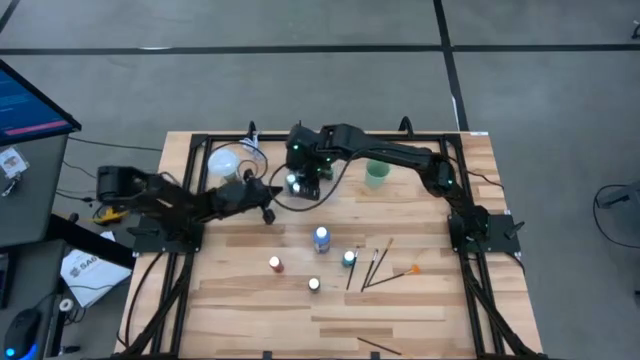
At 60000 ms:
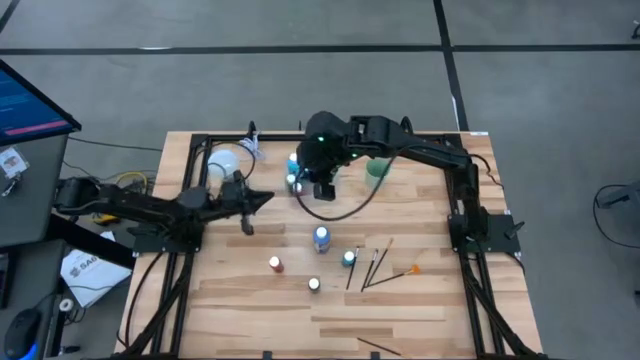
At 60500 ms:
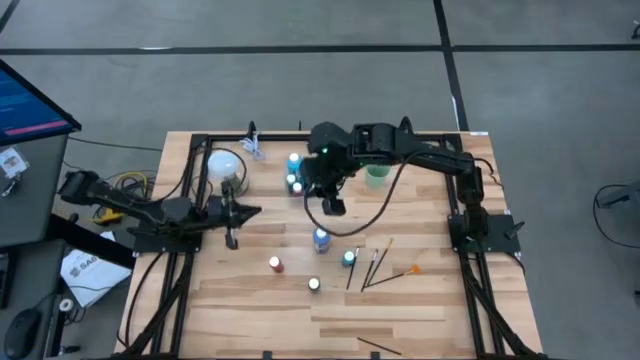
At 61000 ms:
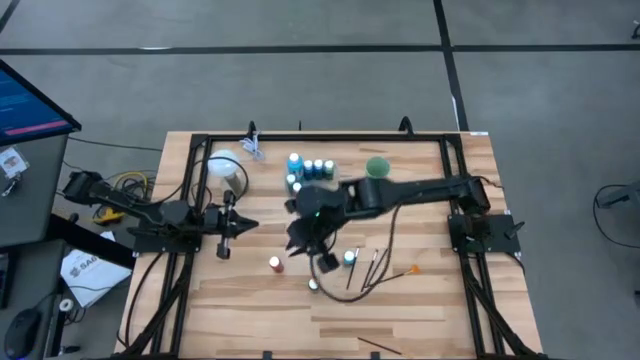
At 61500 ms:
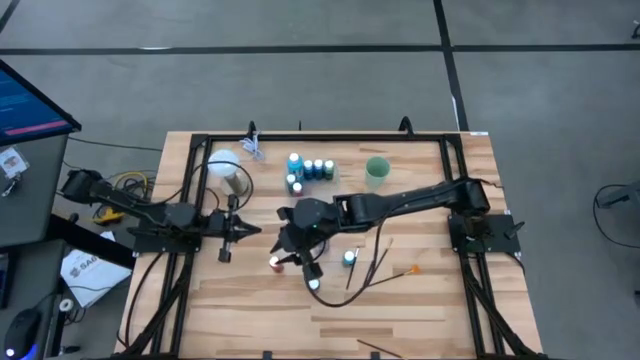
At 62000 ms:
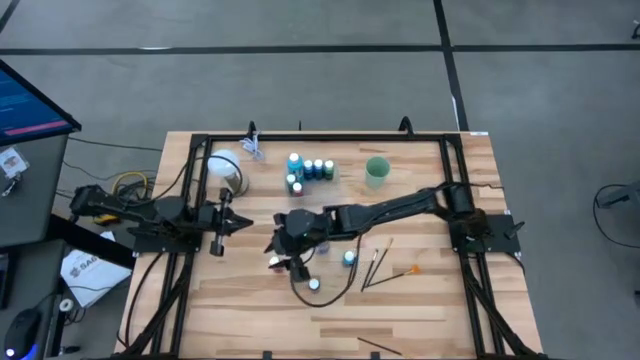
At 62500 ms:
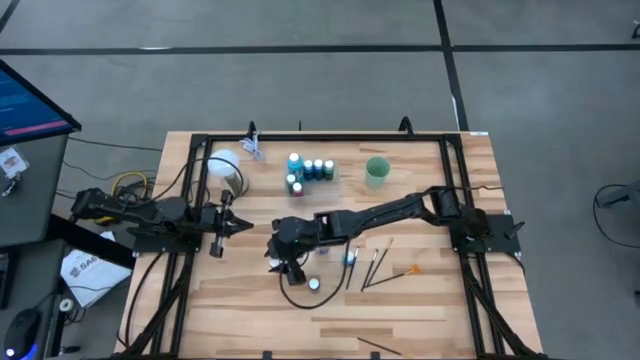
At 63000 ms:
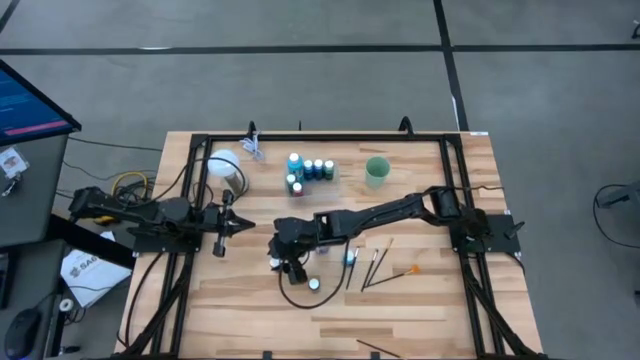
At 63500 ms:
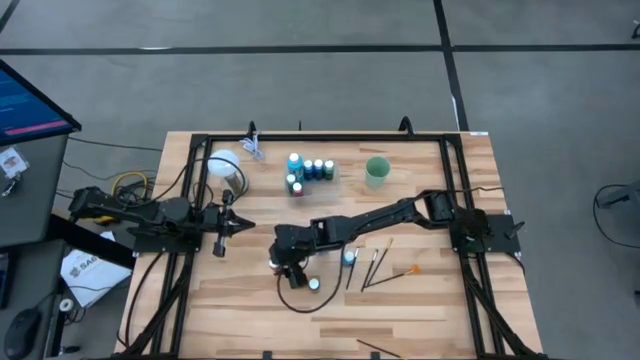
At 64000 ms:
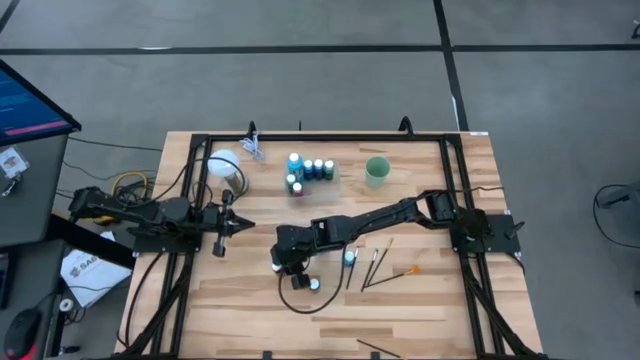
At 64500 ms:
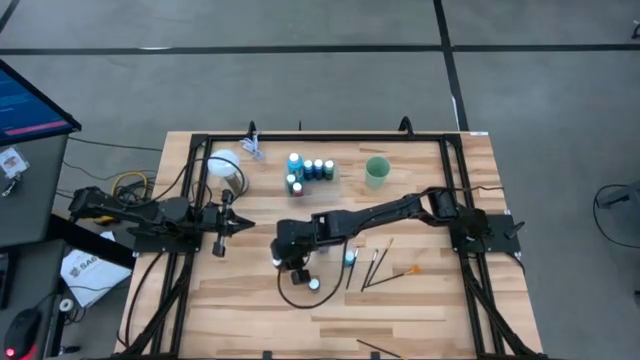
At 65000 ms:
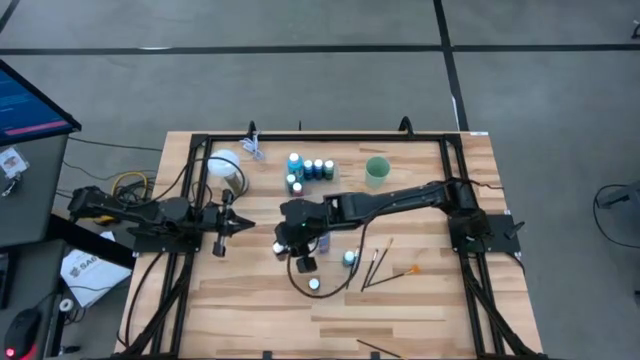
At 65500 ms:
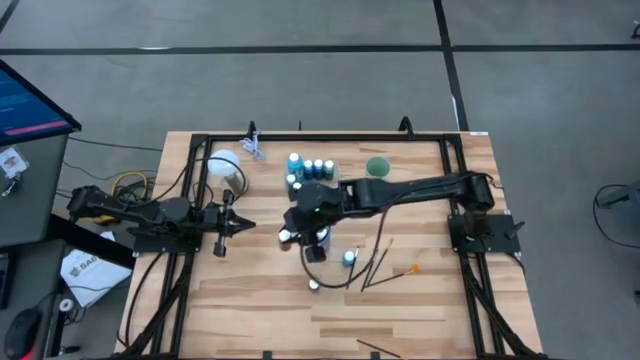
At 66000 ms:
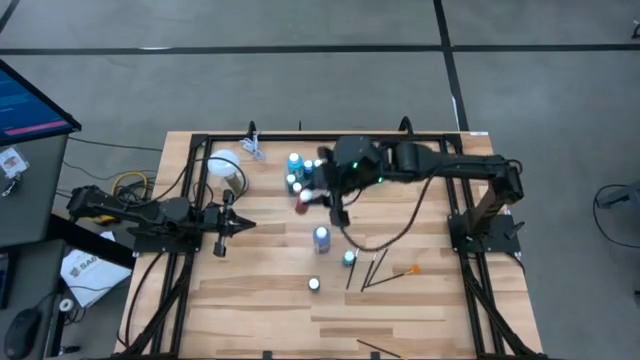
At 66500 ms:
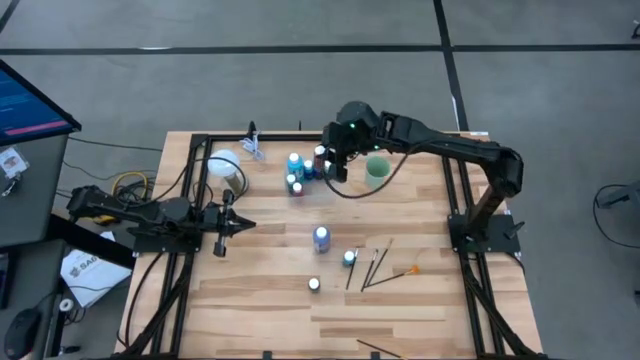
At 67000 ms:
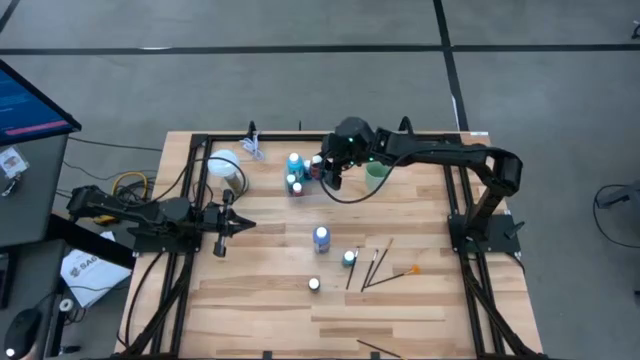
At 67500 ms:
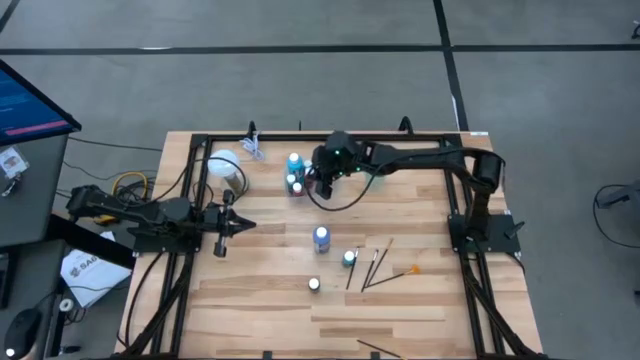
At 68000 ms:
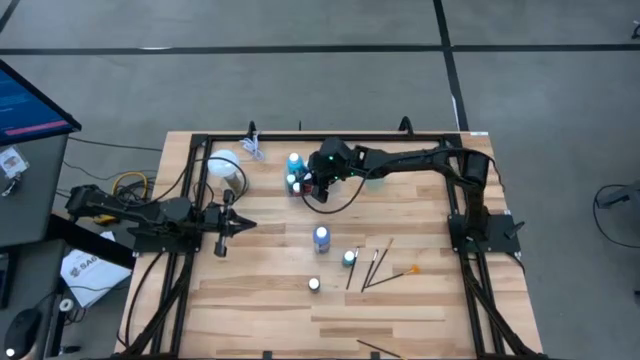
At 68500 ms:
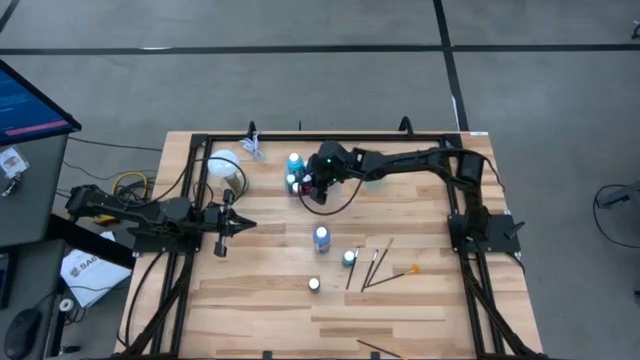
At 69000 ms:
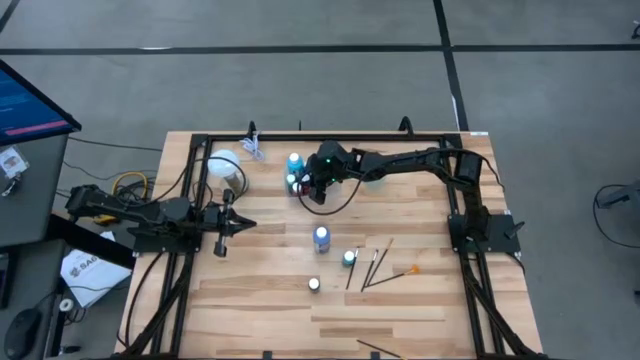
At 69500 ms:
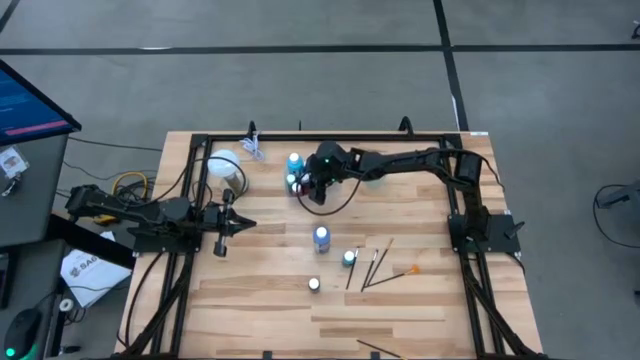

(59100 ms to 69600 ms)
Task: Pick & Place Paint Supplies
Put the small red paint bottle into the bin

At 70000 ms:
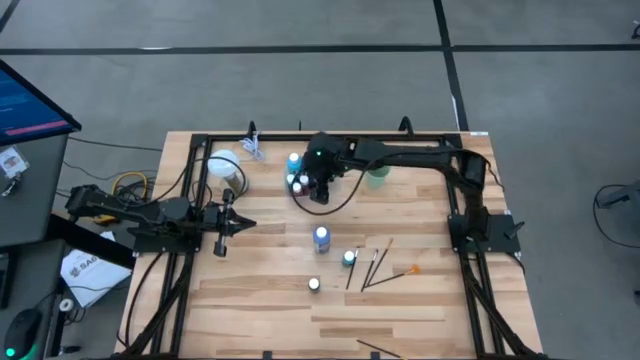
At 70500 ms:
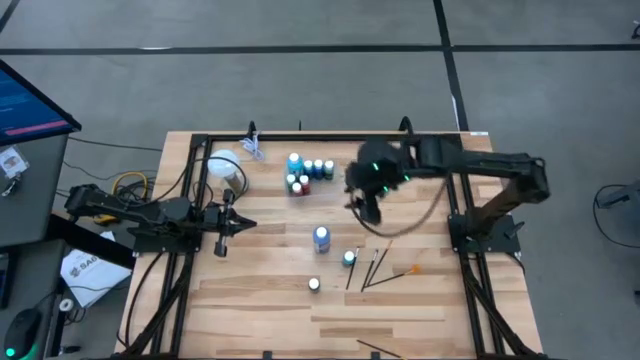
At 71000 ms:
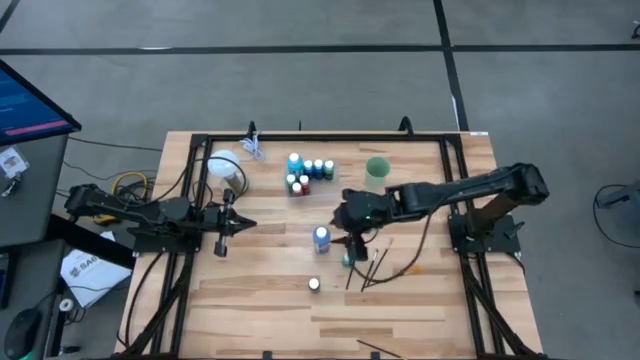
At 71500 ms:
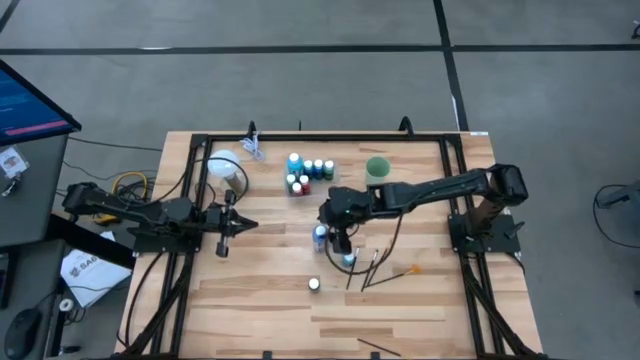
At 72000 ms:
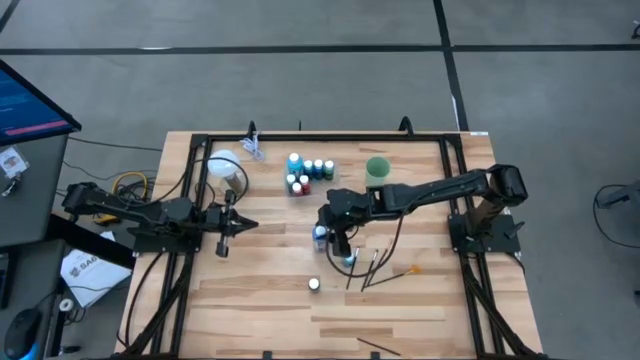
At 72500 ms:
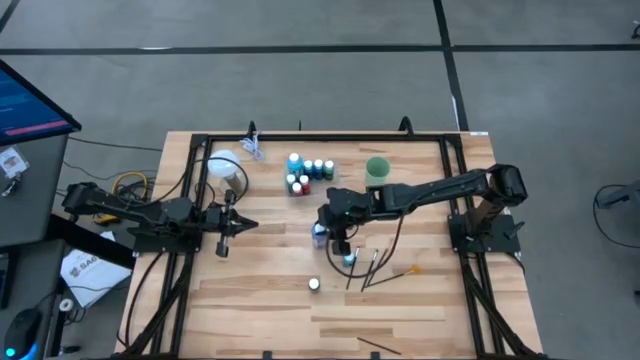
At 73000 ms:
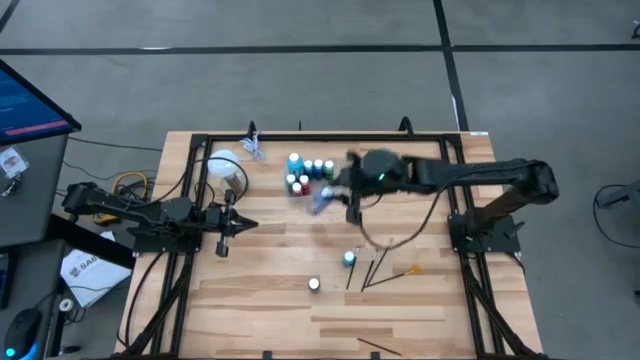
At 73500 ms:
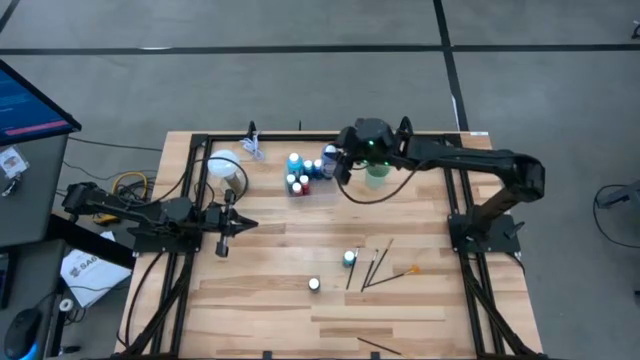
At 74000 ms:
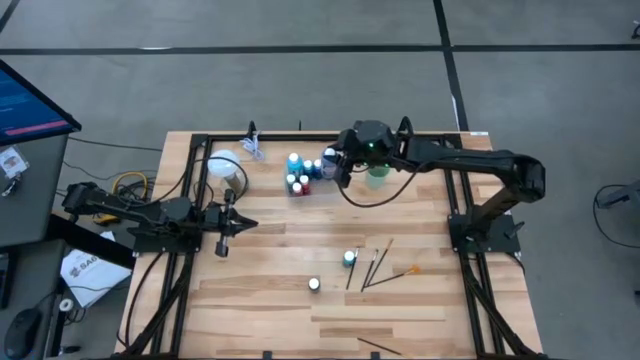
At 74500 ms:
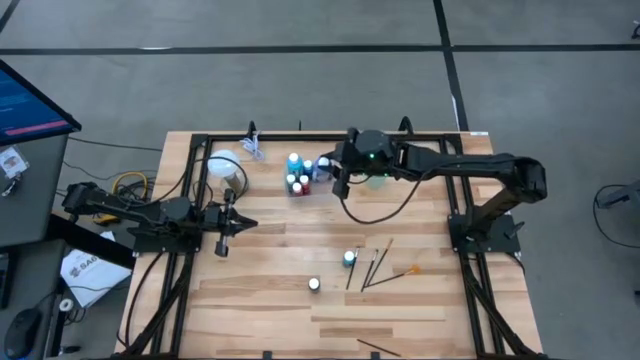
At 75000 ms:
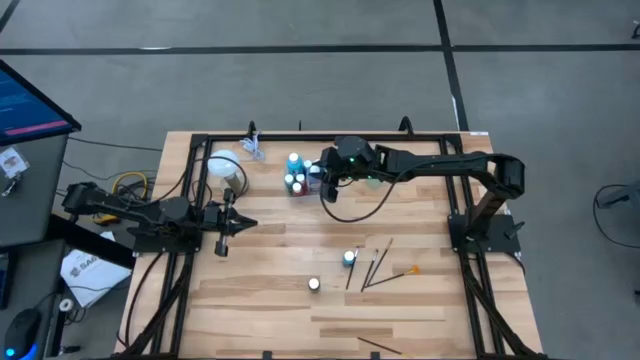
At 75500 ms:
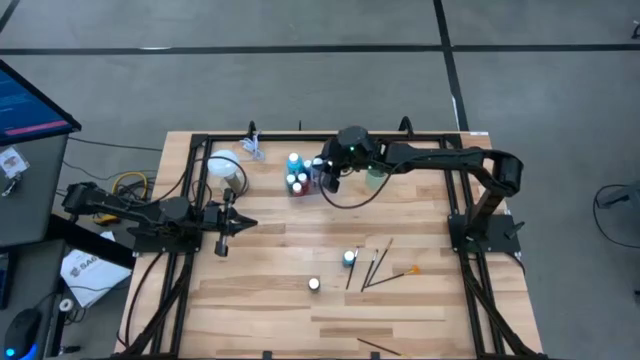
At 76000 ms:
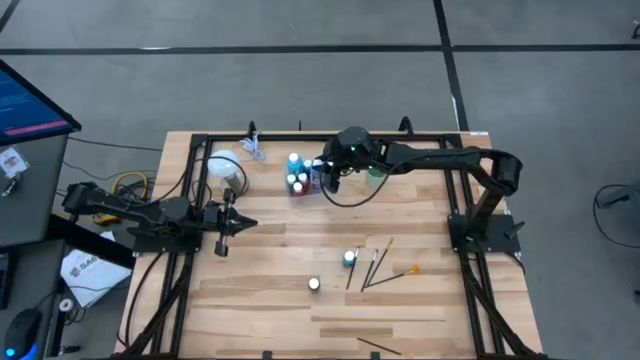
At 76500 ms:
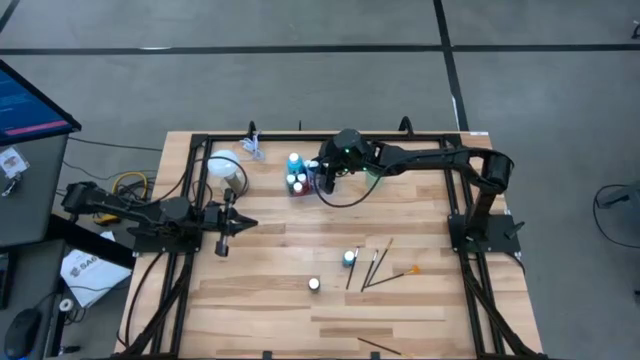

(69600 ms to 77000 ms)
Put the large blue paint bottle into the bin

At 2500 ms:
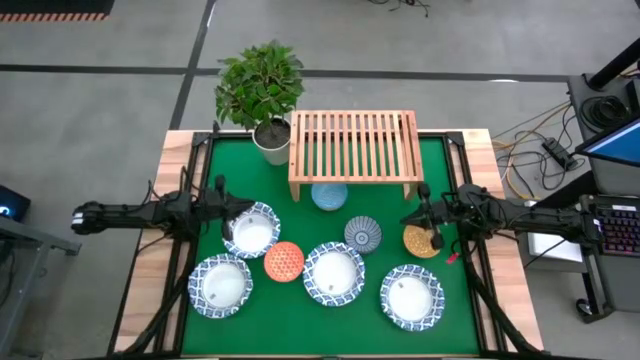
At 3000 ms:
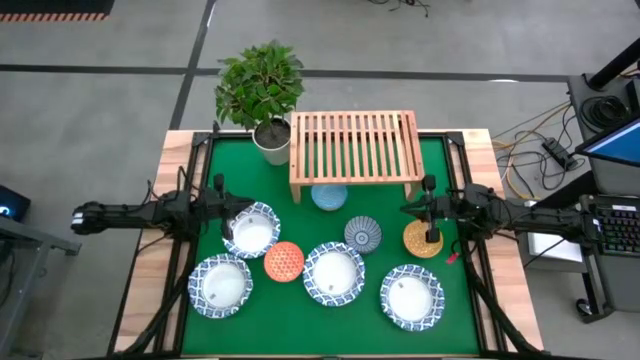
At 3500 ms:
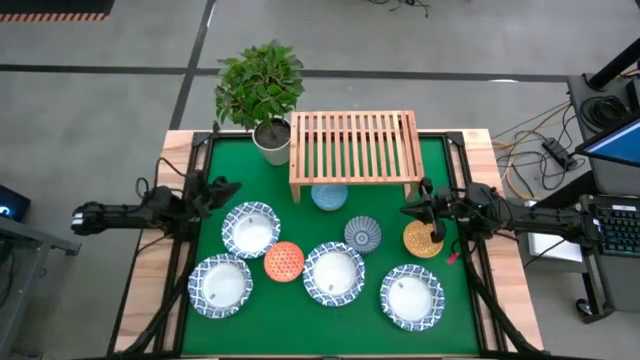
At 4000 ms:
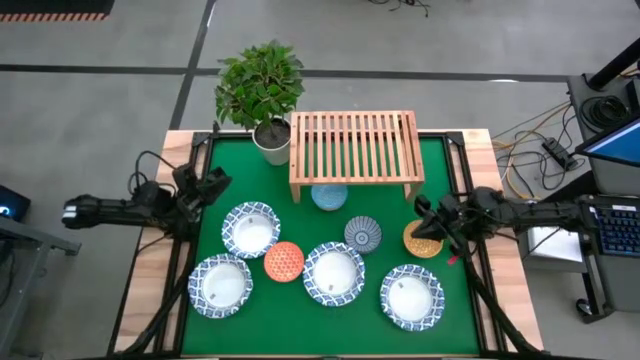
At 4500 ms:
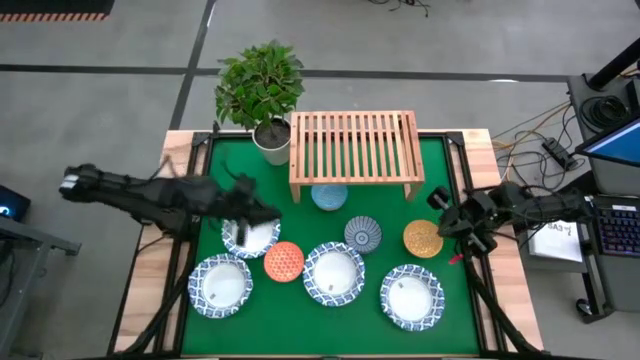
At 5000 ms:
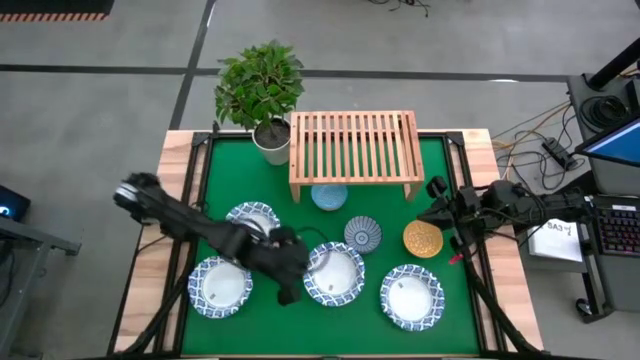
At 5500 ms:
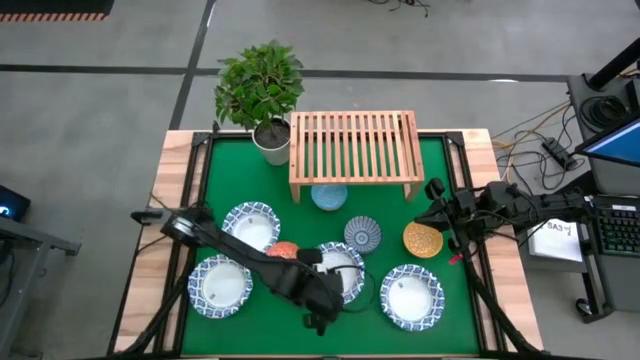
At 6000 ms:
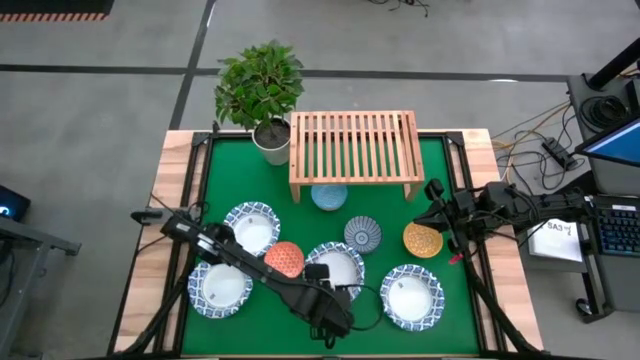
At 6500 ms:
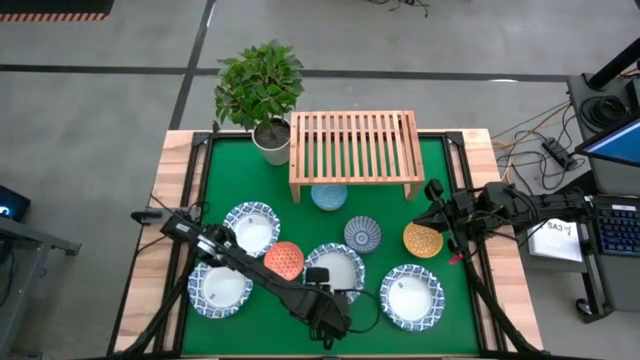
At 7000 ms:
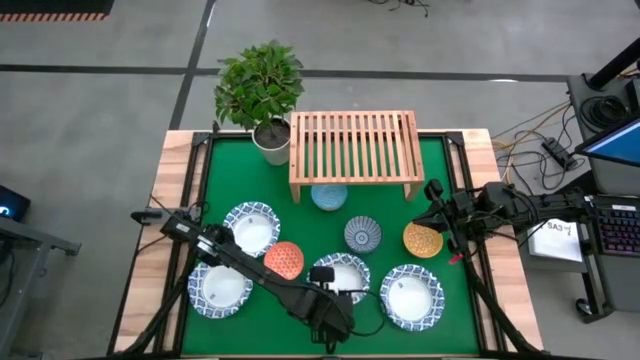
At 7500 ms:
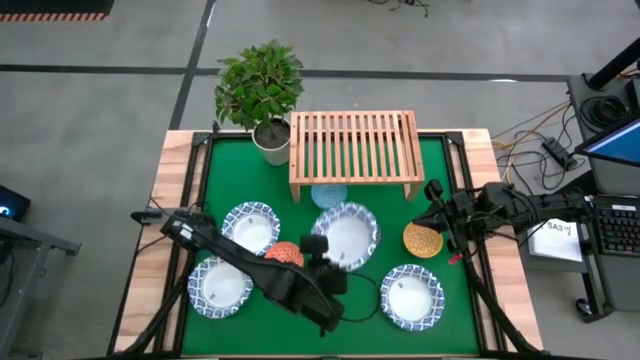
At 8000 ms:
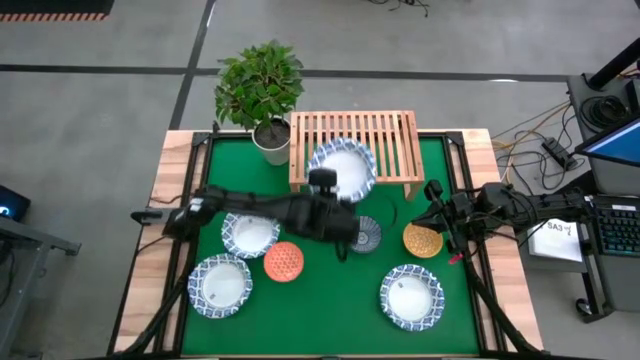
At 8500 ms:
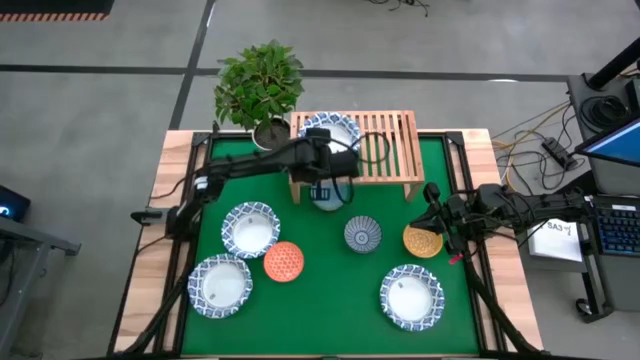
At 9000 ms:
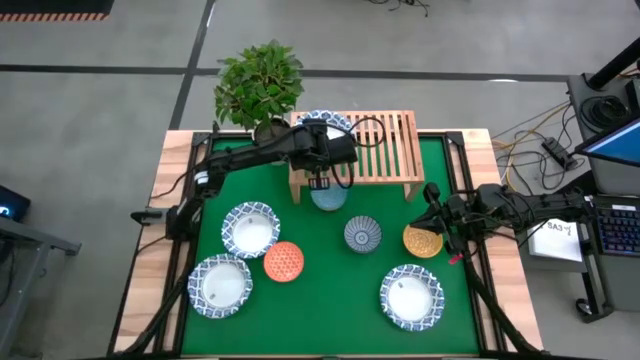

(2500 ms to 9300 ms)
Task: Place and stack bowls onto a shelf
Put the white patterned bowl on the shelf
